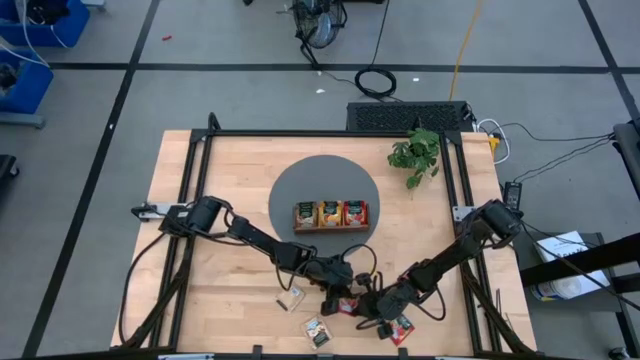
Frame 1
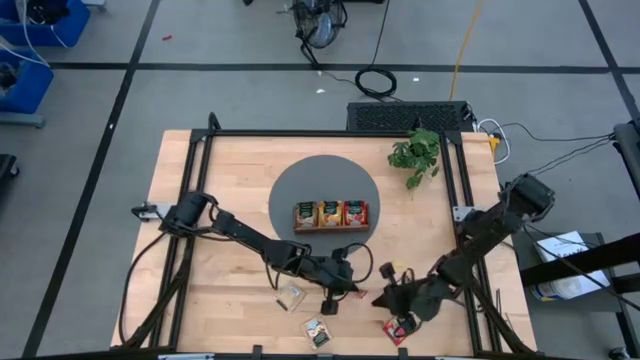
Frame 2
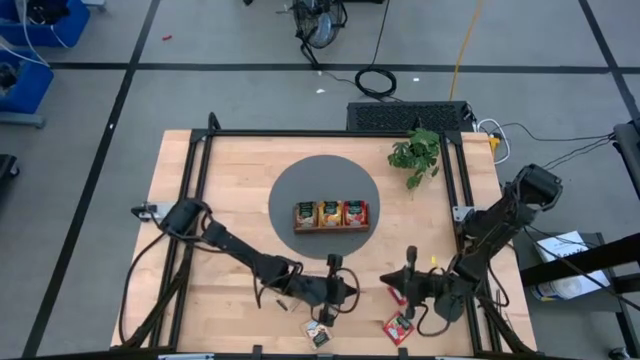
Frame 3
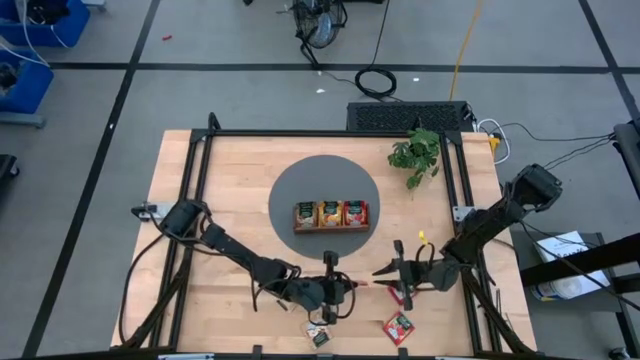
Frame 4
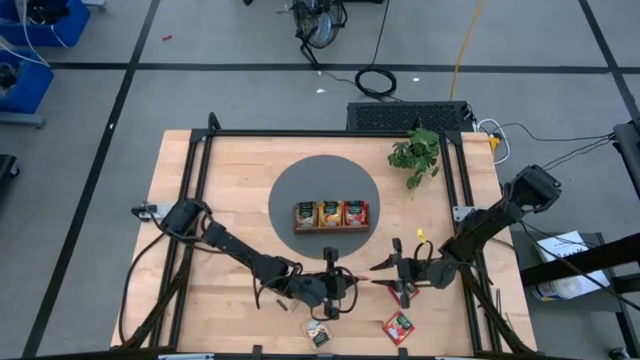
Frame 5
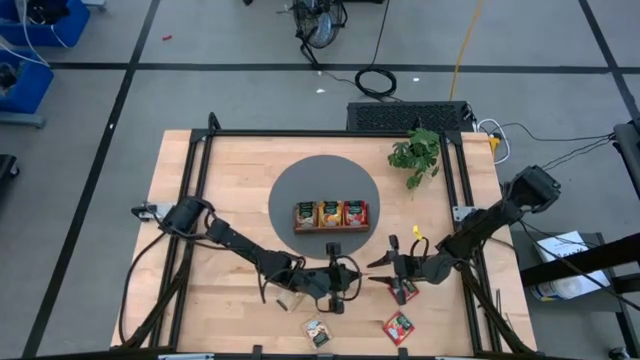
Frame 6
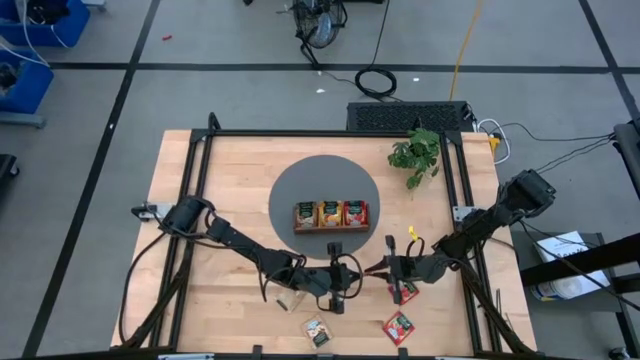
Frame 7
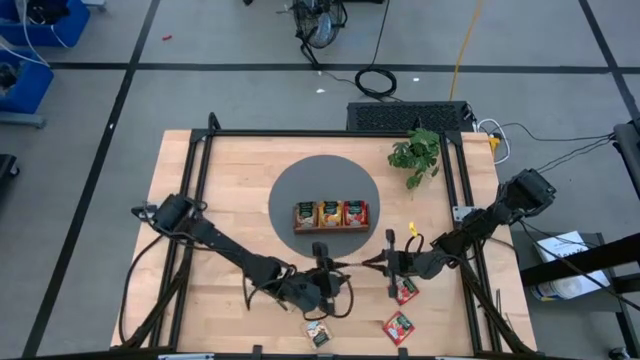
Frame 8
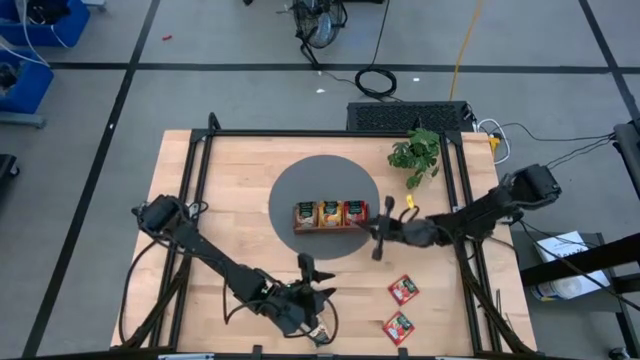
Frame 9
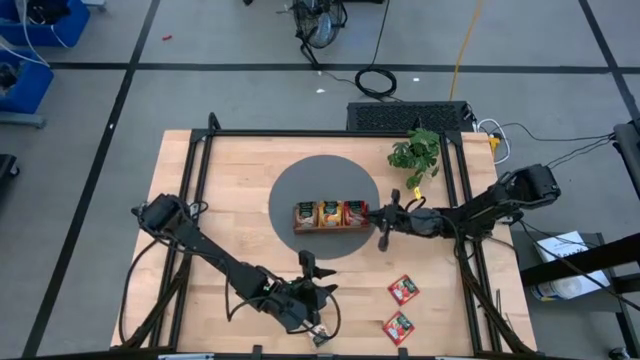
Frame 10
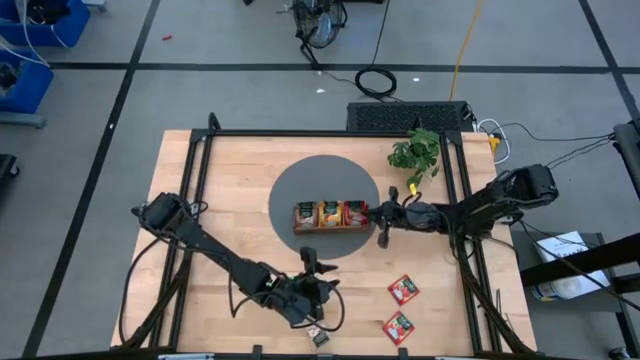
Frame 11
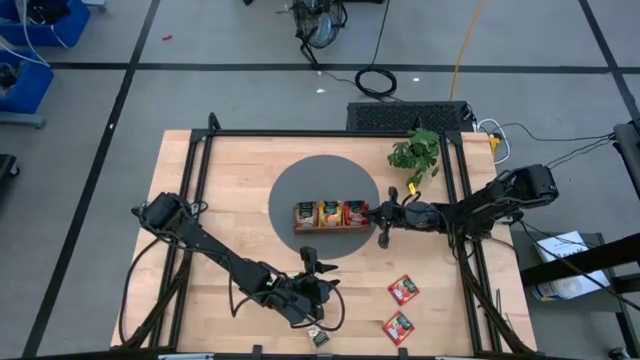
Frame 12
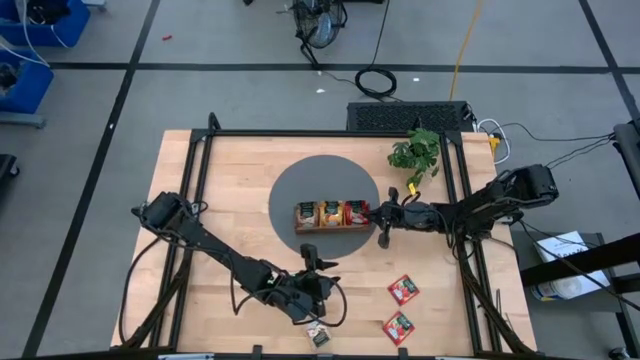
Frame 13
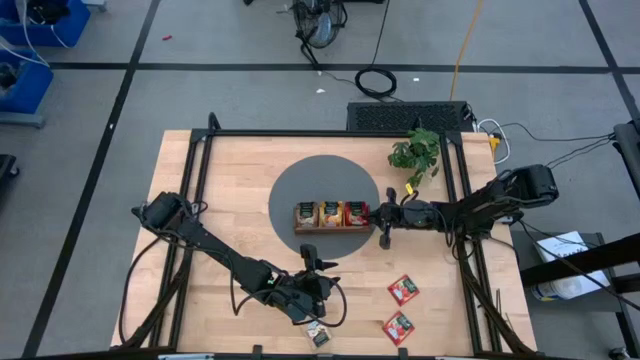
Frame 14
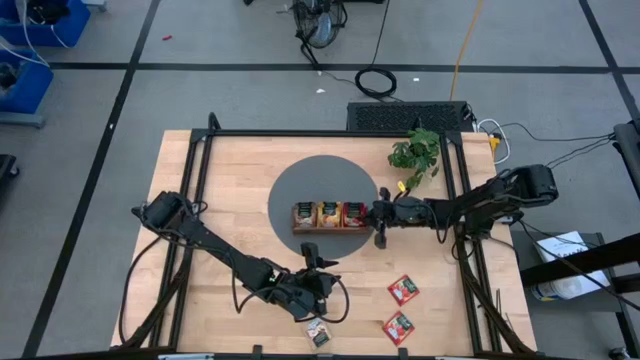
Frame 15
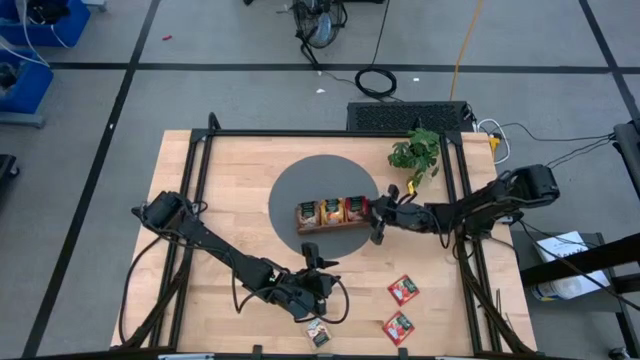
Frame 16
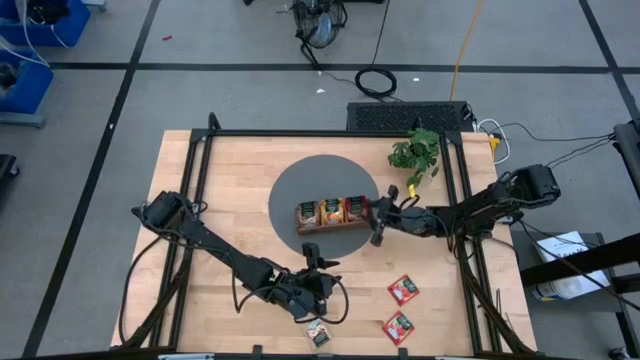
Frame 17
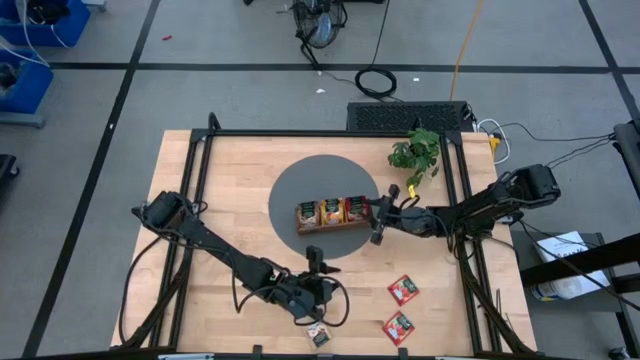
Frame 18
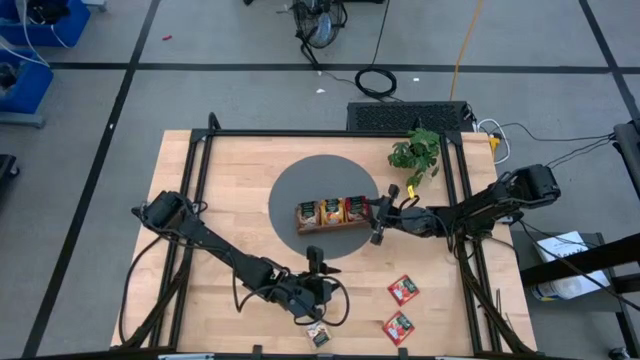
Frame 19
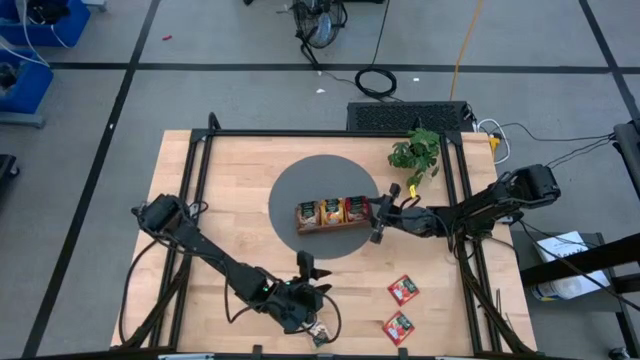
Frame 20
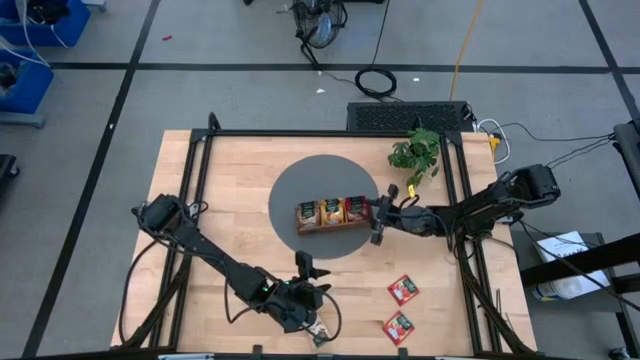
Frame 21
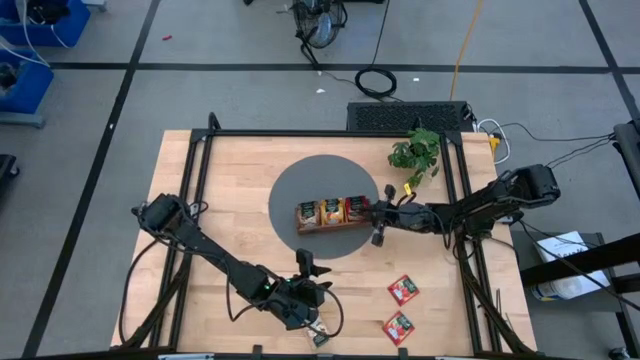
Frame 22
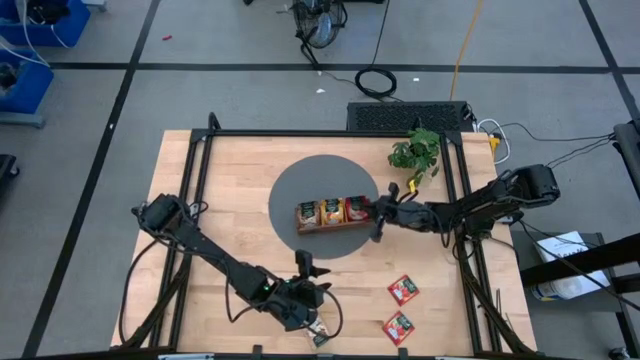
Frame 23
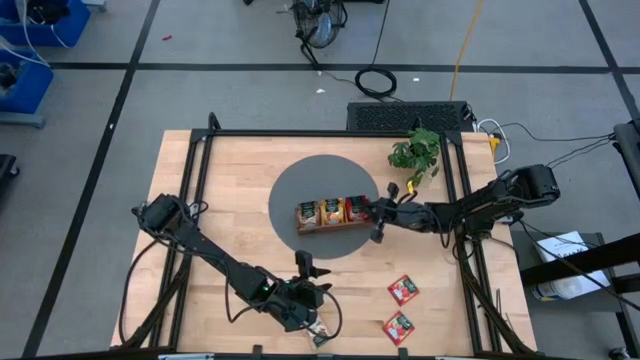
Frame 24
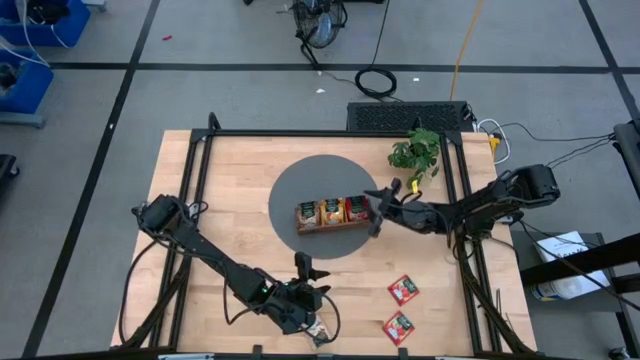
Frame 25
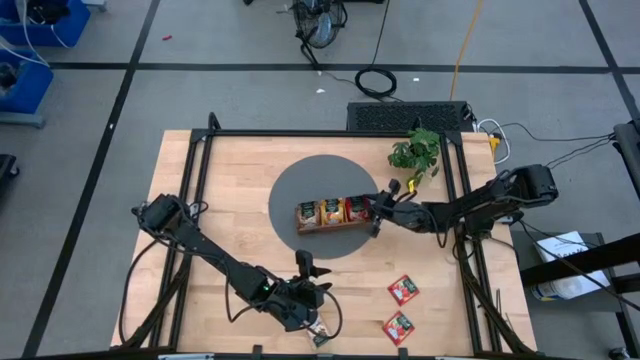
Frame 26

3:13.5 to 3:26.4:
Task: Pick & Place Tea
Put the red tea bag into the right section of the wooden organizer

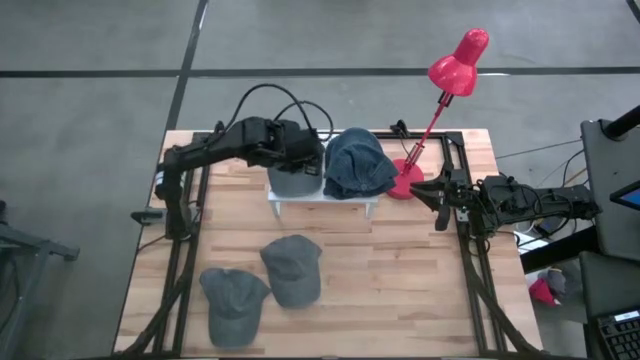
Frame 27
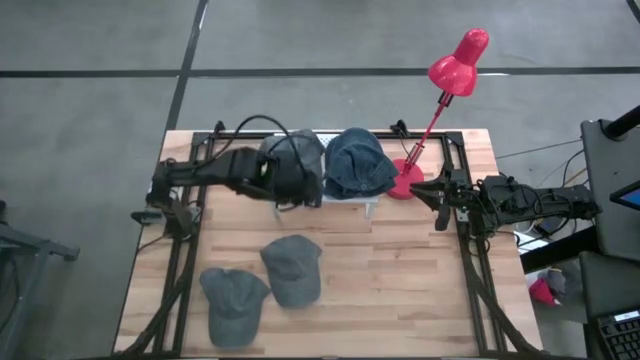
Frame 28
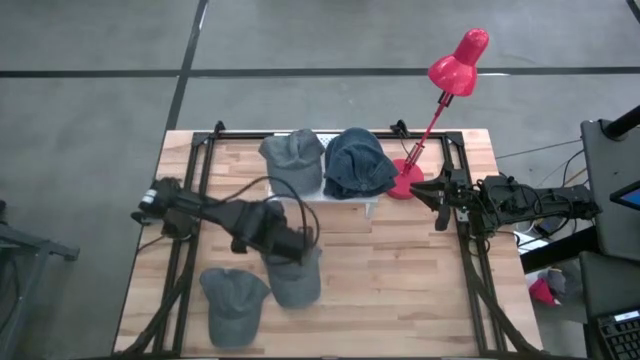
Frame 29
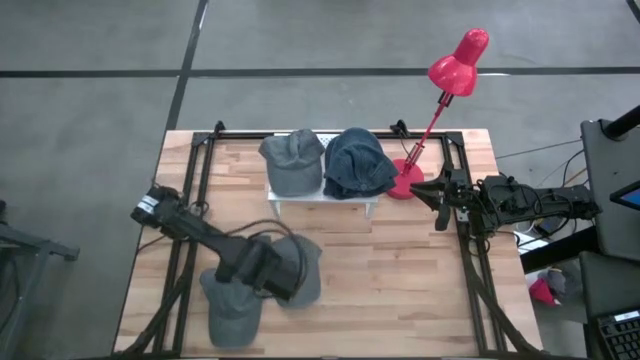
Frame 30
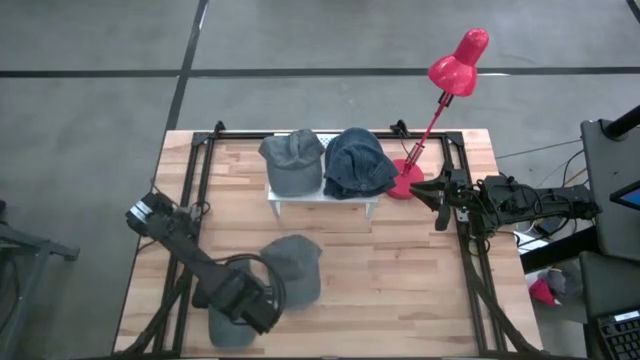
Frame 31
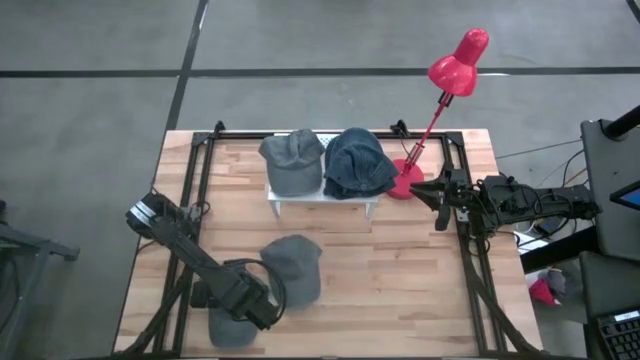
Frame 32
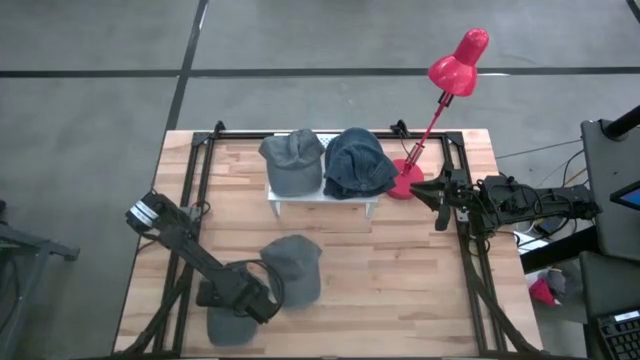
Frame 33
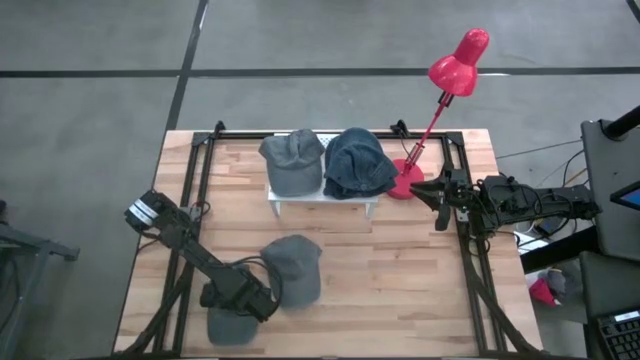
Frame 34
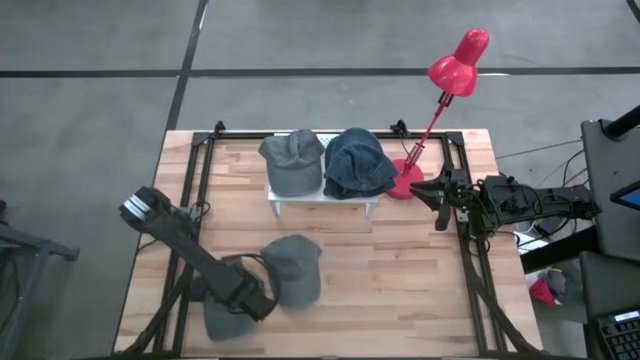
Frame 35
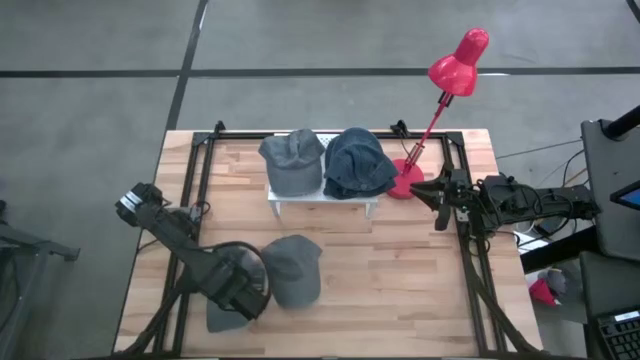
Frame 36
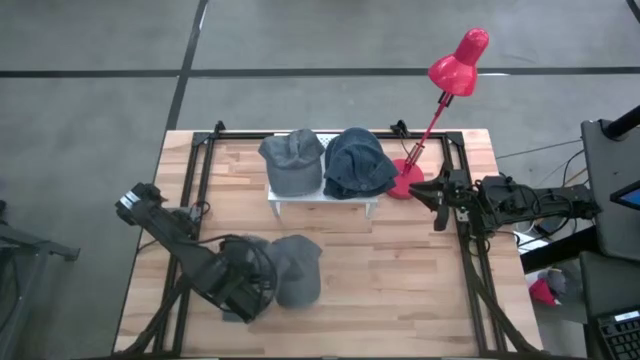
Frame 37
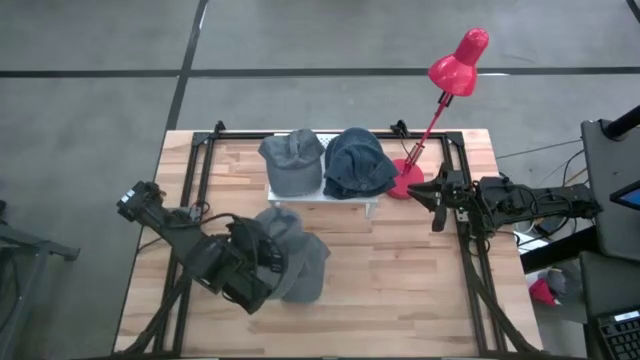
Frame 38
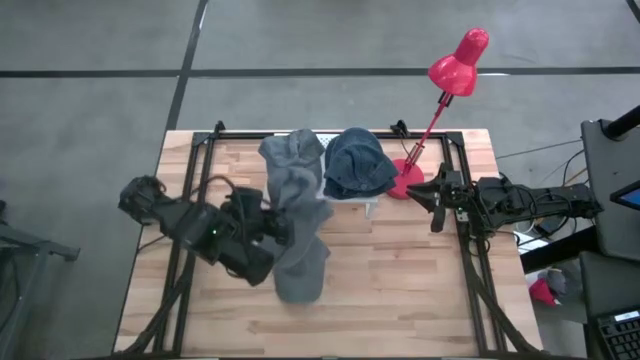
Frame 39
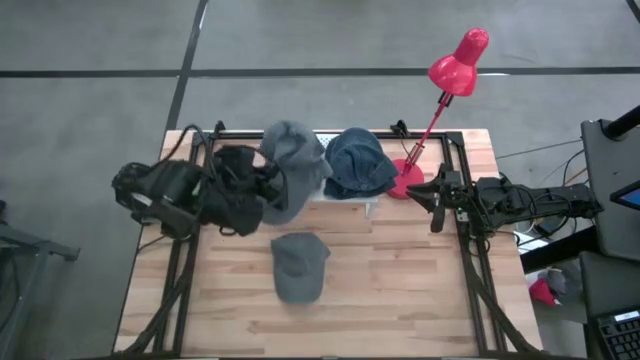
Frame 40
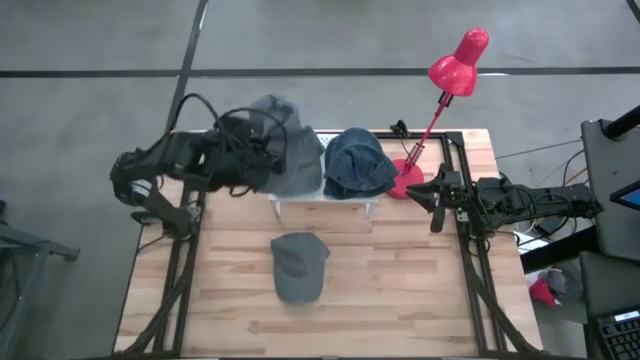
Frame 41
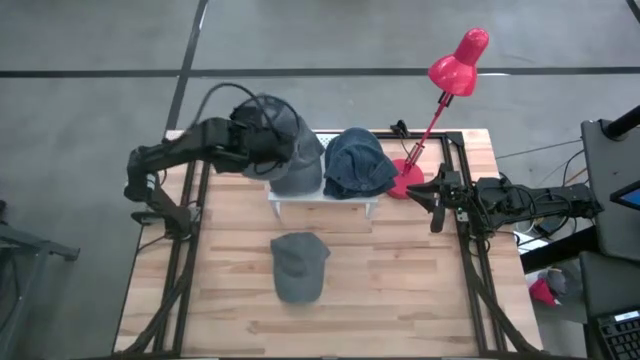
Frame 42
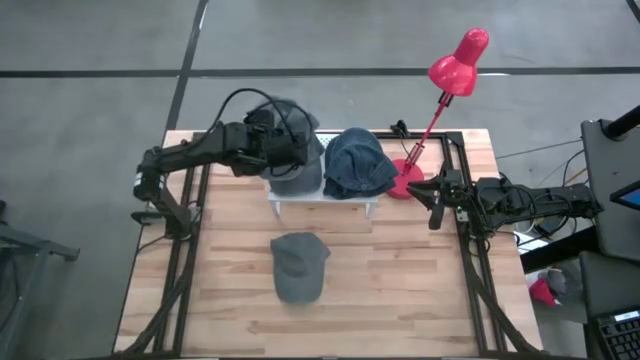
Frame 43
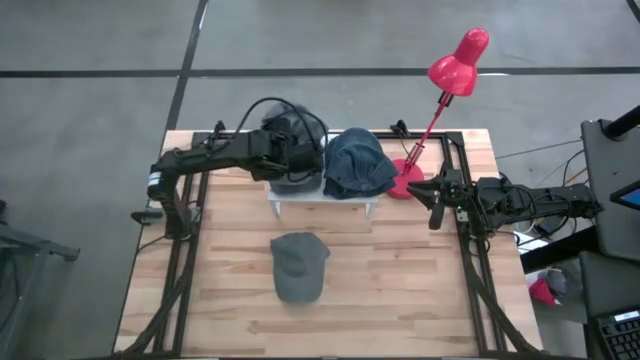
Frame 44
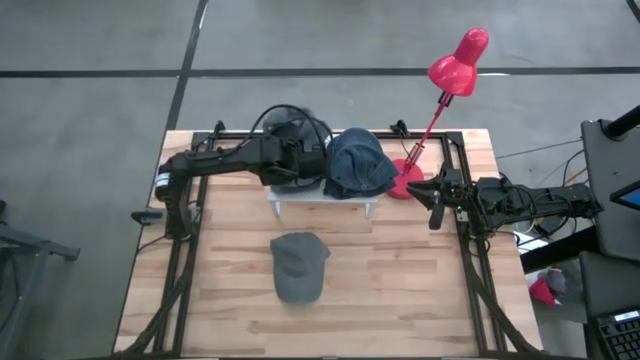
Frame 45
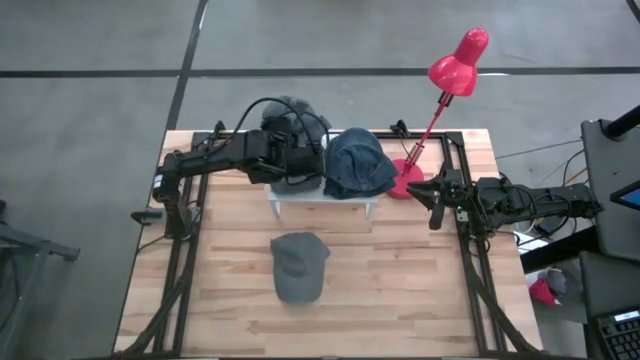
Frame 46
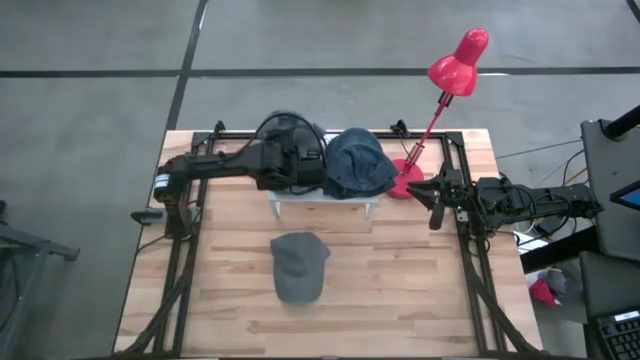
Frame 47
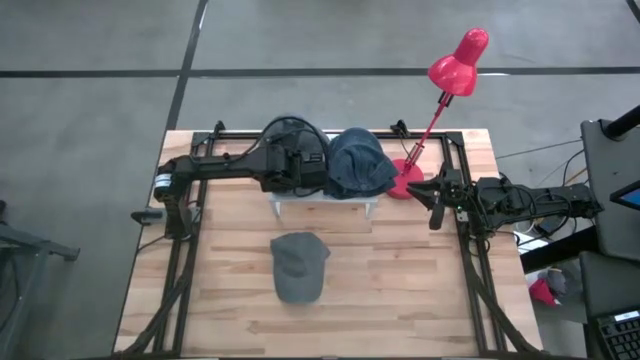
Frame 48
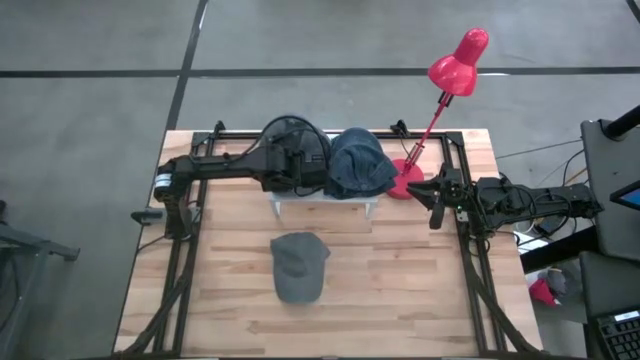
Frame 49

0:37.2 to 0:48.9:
Task: Pick & Place hat
Stack the left gray cap on the other gray cap on the shelf
